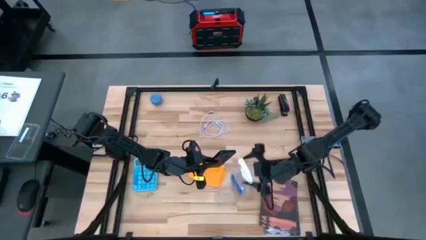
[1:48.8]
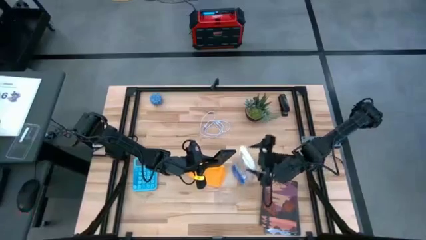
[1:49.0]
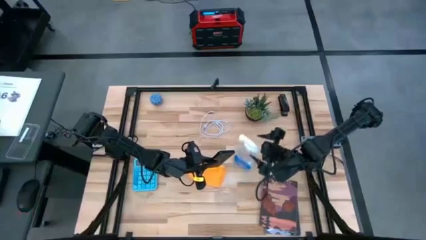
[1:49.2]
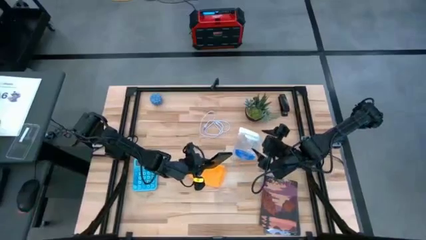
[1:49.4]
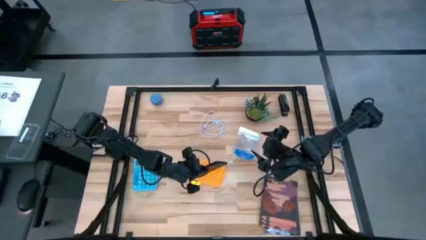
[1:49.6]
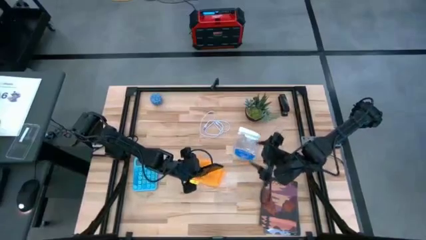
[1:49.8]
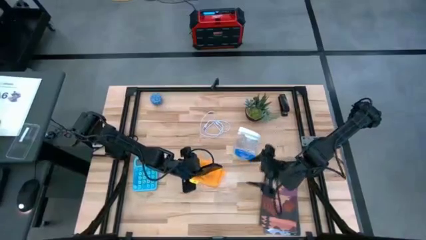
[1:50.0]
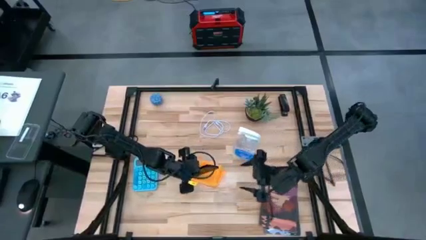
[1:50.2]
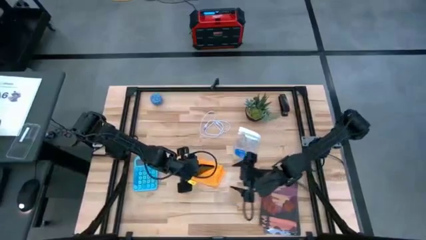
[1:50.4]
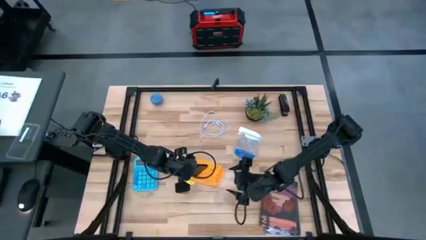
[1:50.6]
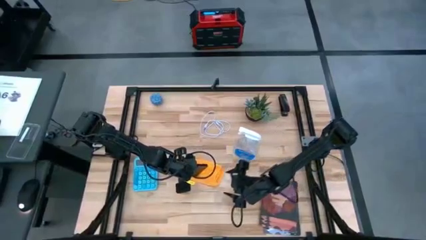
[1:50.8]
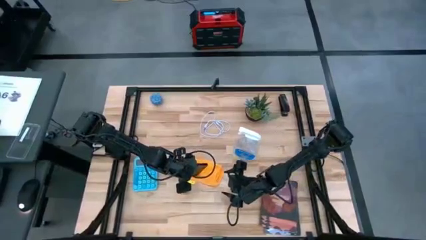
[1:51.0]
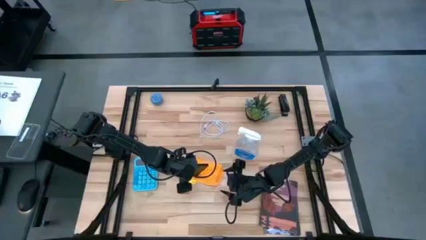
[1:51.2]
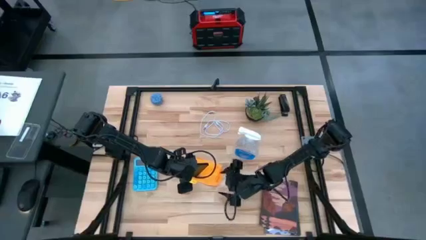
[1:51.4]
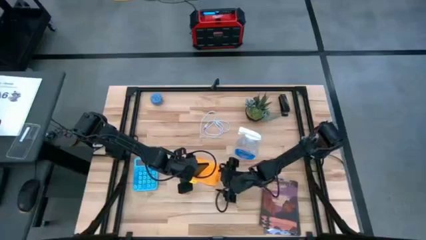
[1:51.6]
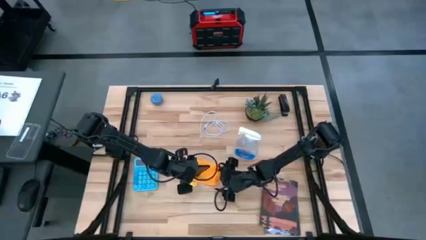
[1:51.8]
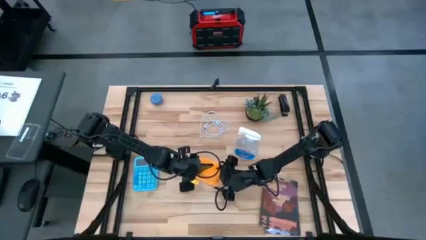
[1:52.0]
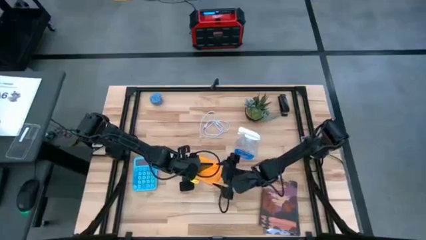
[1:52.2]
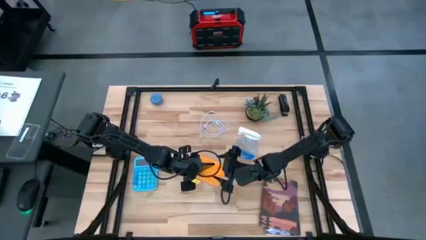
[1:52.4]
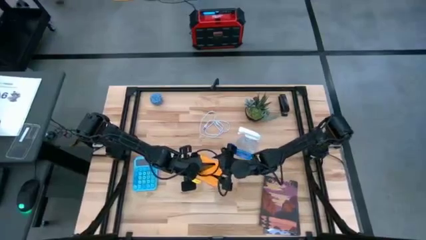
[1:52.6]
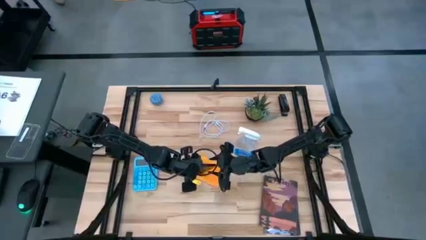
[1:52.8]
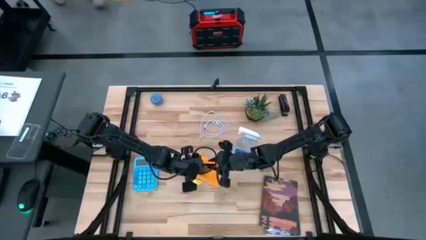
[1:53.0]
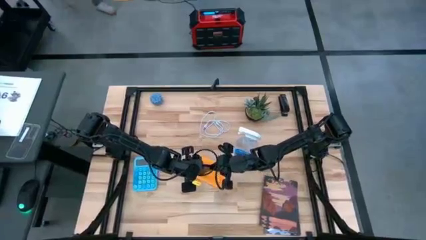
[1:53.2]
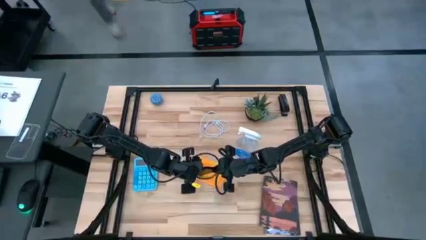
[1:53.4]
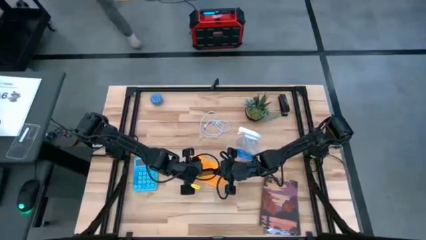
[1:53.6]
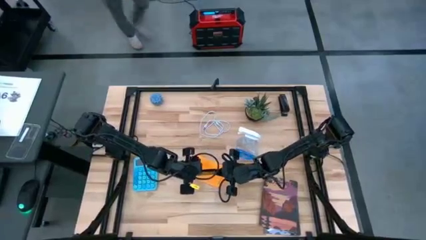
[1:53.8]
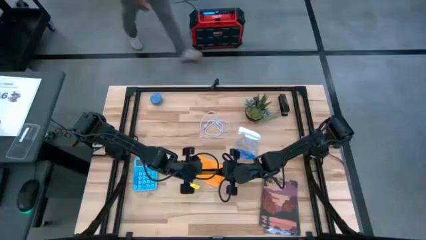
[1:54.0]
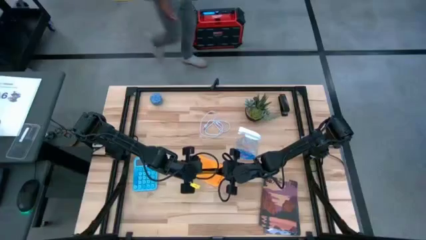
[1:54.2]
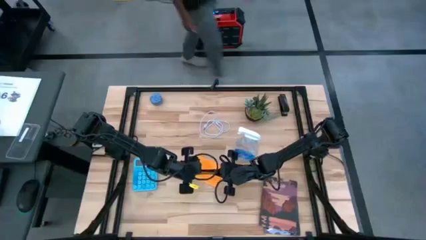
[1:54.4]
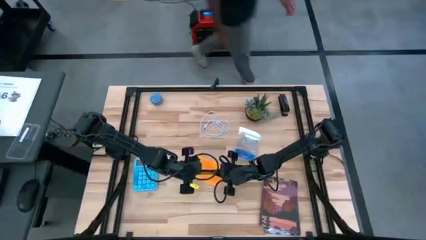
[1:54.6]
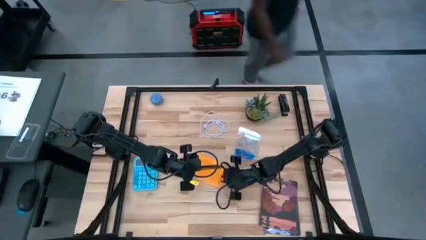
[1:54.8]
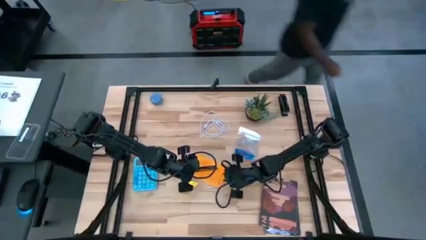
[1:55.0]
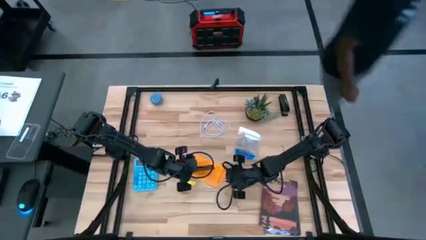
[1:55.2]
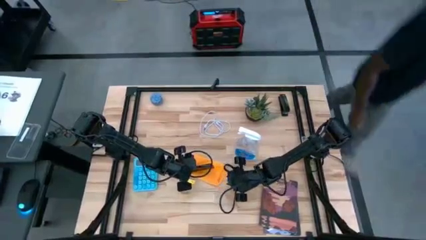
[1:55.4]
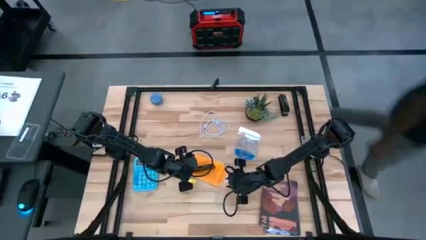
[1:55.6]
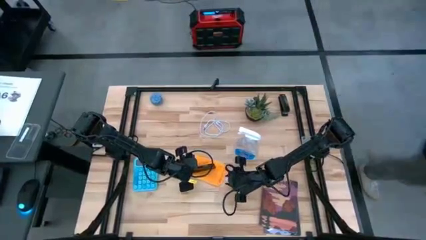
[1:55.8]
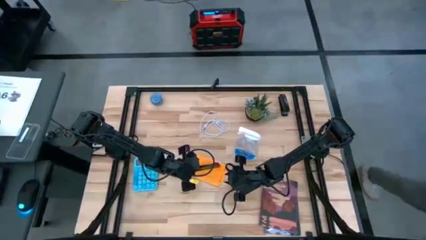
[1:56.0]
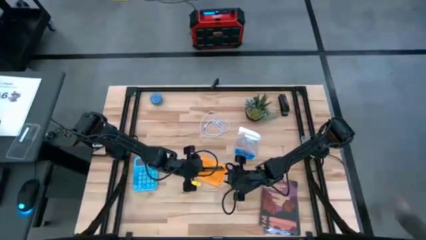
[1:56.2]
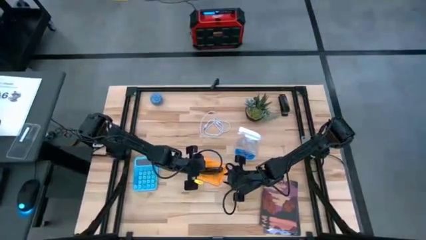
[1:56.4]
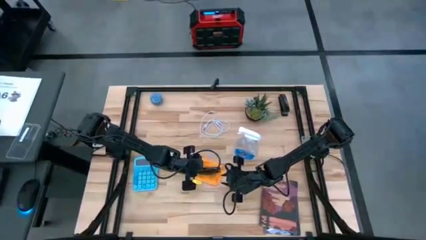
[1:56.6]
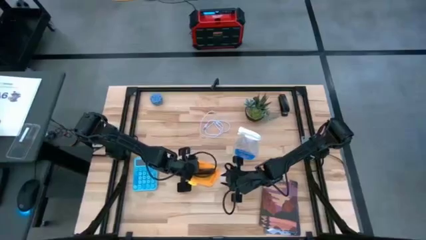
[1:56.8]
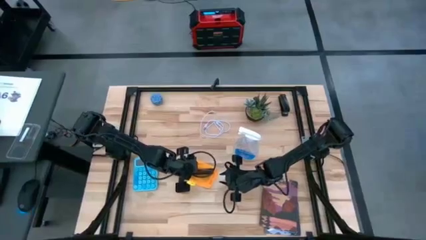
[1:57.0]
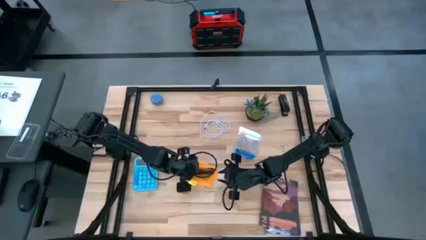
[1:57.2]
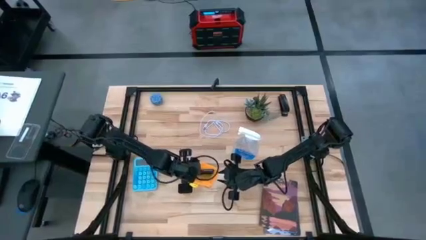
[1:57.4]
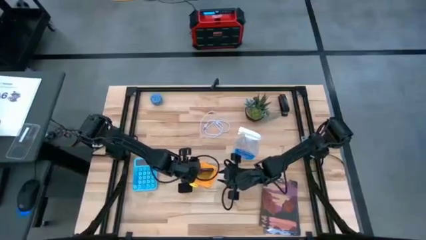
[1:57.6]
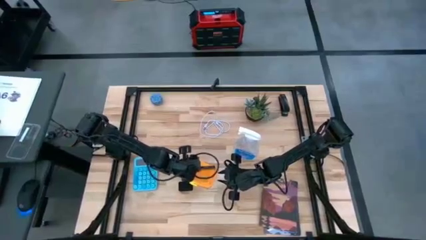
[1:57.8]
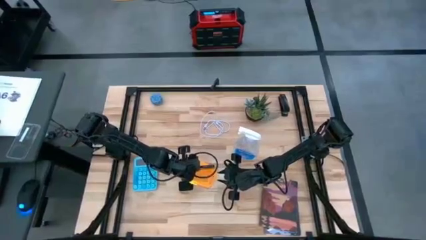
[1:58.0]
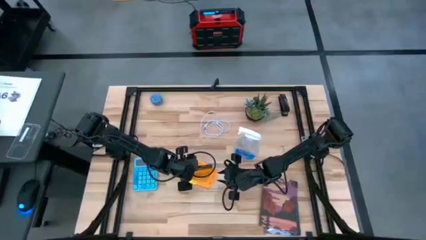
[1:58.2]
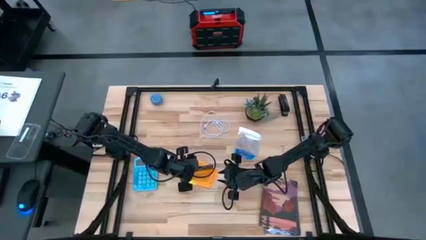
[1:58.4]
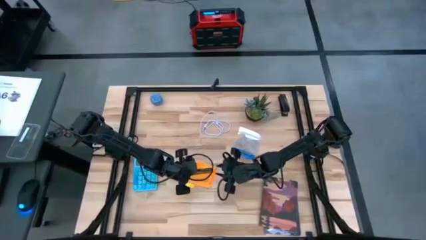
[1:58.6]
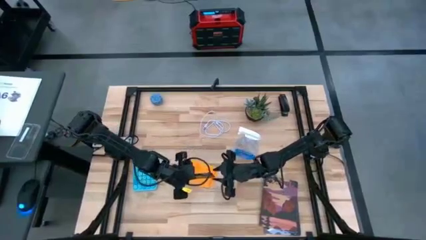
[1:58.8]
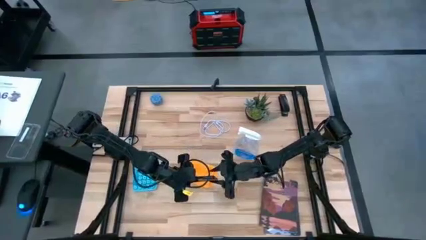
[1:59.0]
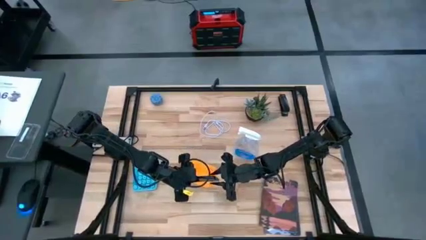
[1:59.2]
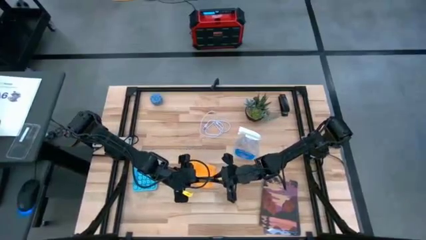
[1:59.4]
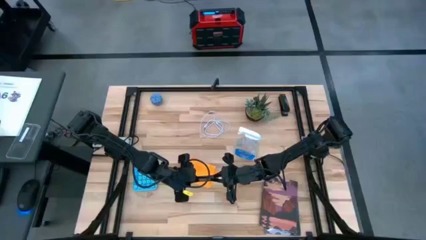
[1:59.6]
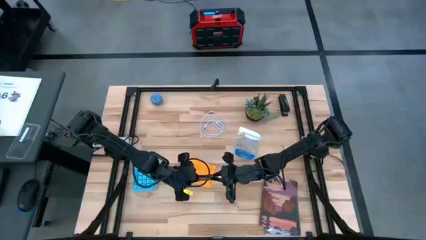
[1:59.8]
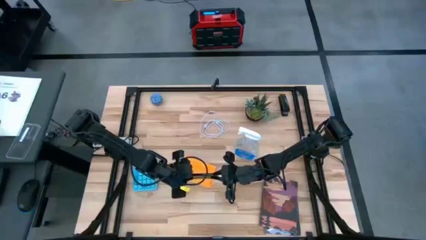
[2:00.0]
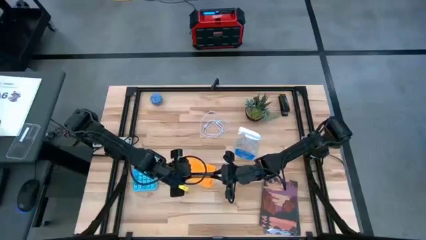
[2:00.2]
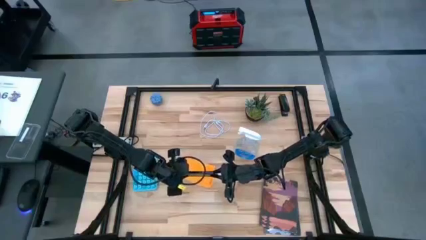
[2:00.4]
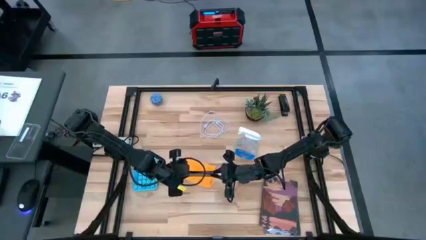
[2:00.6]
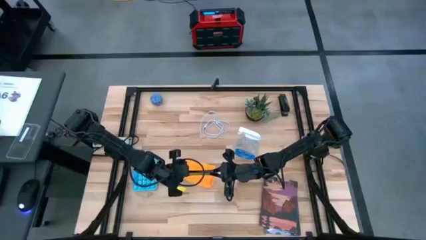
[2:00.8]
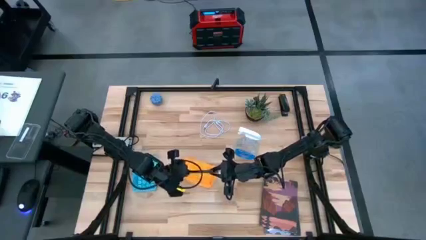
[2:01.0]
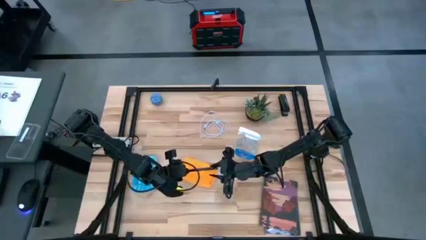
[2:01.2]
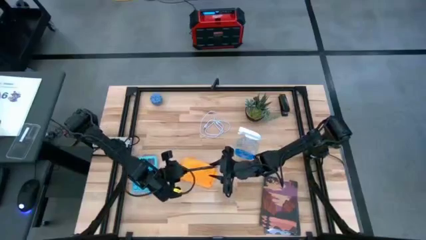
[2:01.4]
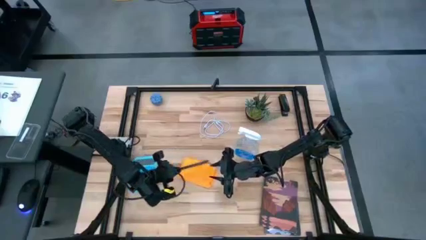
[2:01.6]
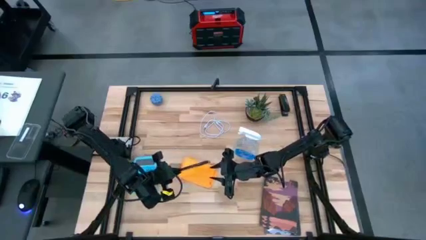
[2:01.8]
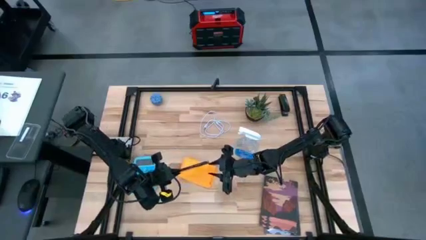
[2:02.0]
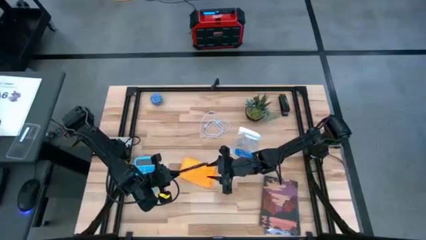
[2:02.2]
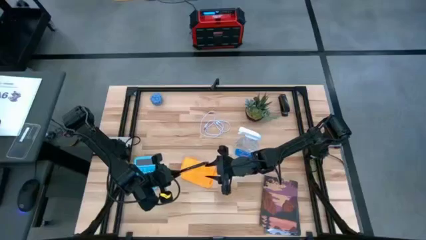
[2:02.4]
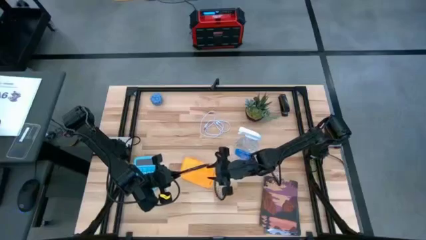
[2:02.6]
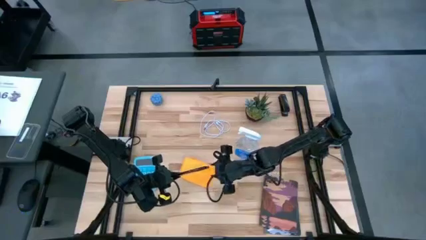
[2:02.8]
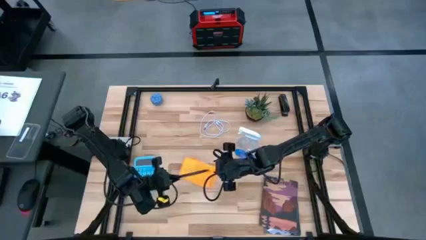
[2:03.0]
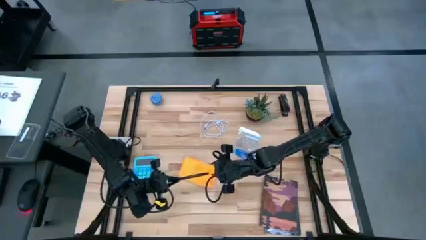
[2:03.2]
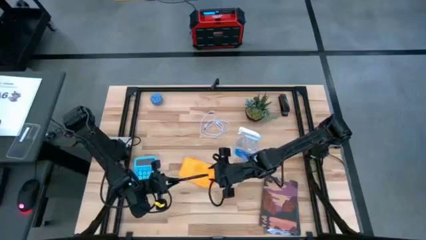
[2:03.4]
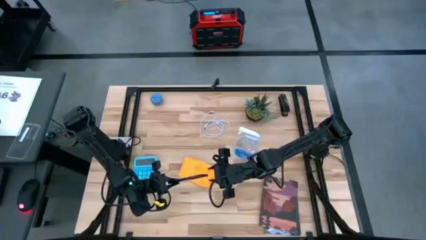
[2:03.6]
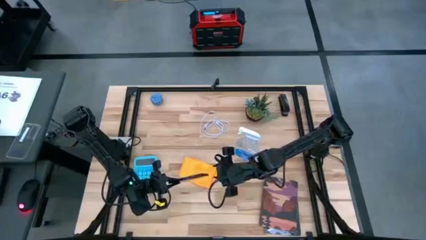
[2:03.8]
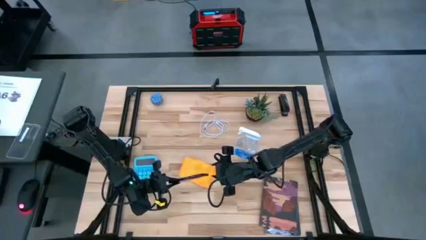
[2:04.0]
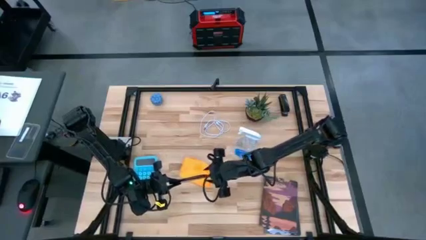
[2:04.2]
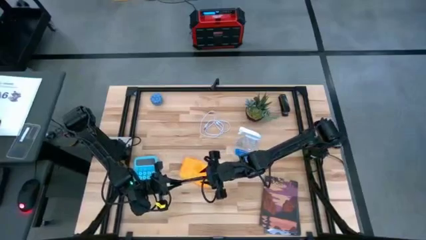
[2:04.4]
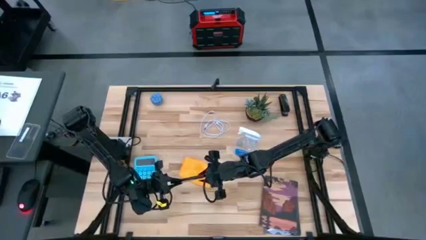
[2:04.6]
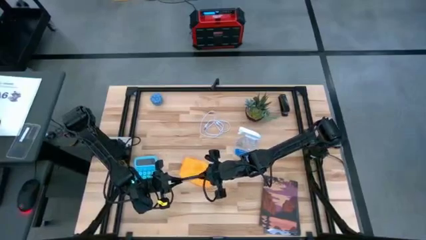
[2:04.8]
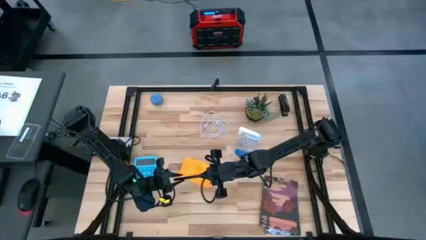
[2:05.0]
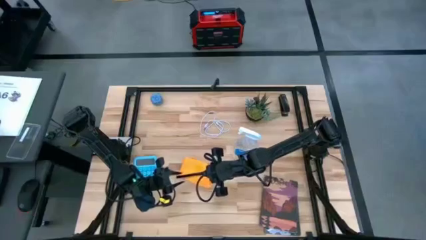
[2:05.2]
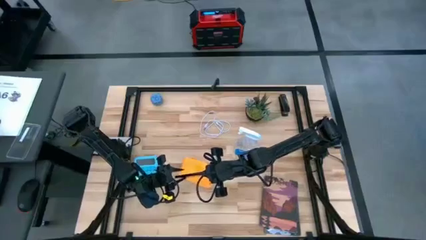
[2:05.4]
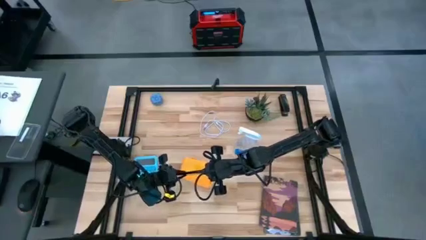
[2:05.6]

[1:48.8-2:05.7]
Task: Apply microfiber cloth
Wipe the black cellphone using microfiber cloth

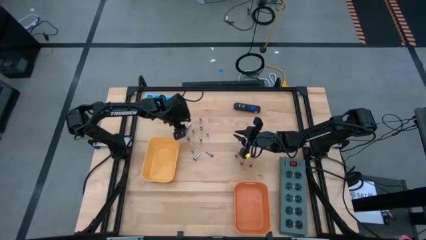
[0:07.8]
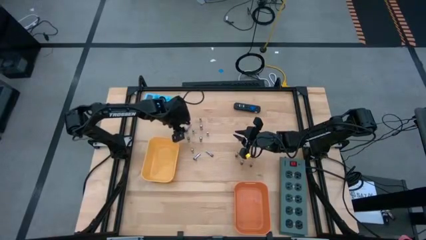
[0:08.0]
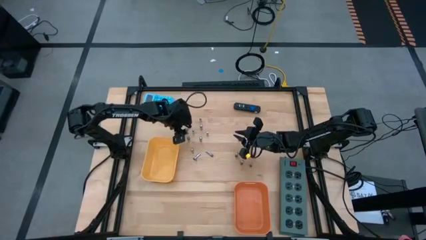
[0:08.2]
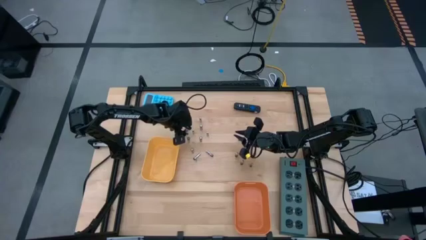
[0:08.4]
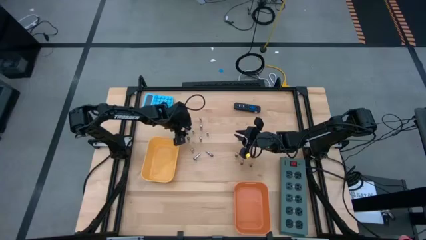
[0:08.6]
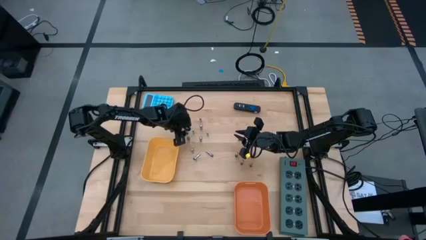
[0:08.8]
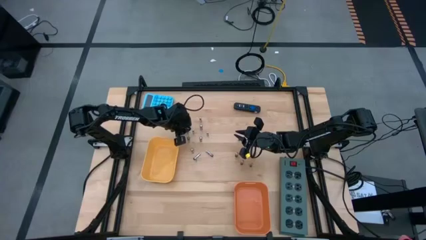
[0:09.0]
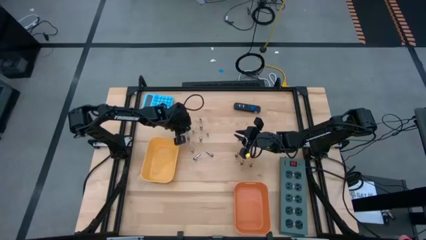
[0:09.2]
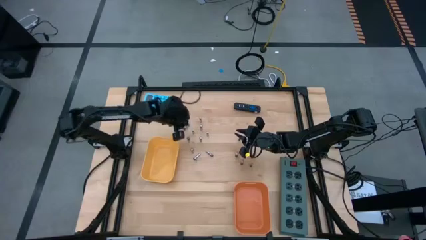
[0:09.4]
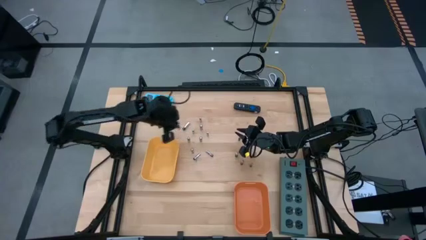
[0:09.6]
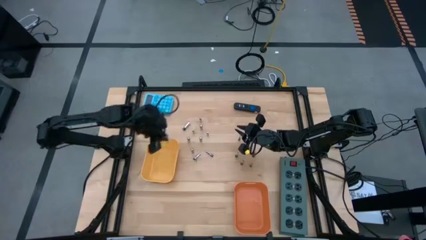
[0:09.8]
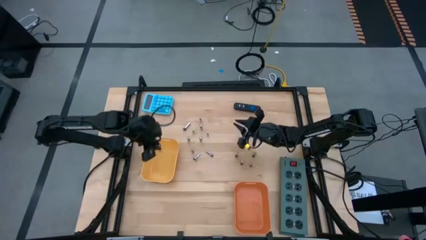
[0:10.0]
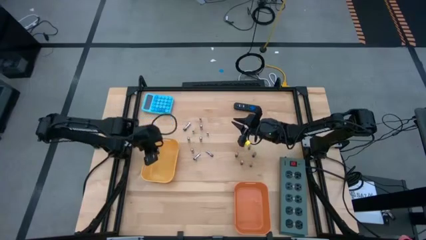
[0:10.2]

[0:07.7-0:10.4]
Task: Sort batteries
Put the silver battery into the yellow bin
